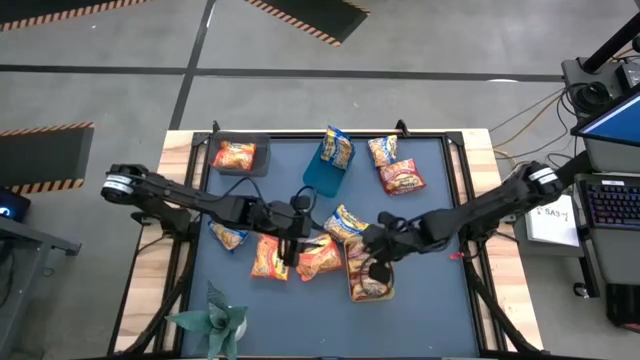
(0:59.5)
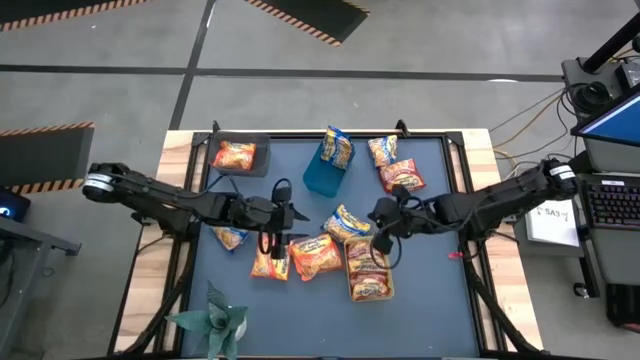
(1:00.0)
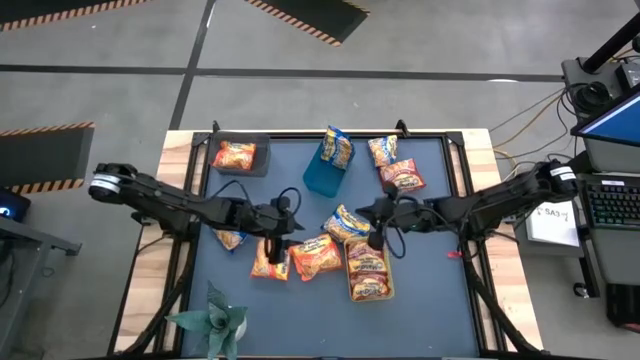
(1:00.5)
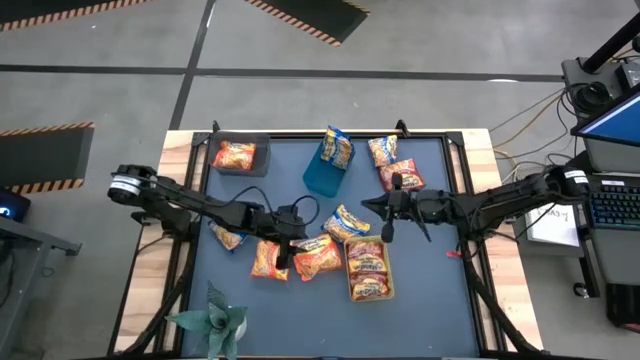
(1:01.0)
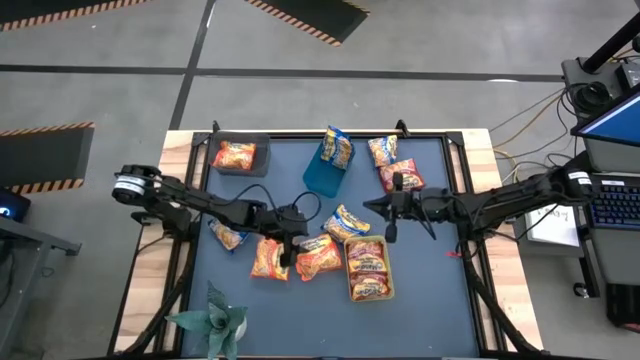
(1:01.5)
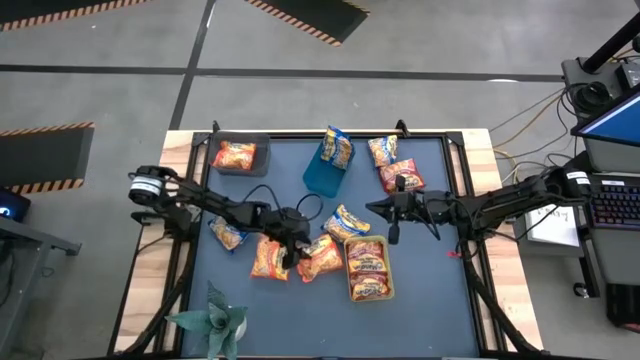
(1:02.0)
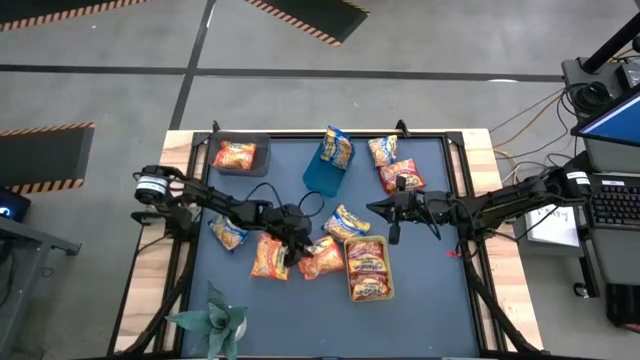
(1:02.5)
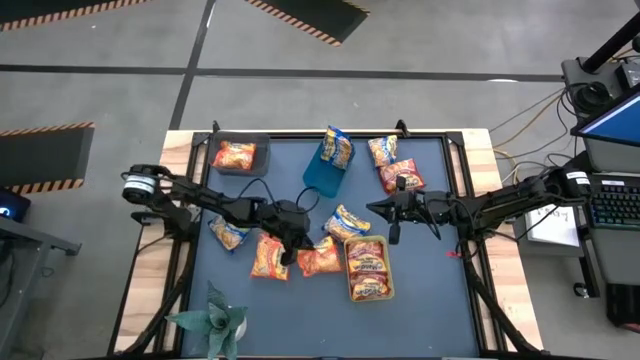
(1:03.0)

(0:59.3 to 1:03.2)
Task: Sort Maruchan noodles
Put the orange noodle pack into the black bin

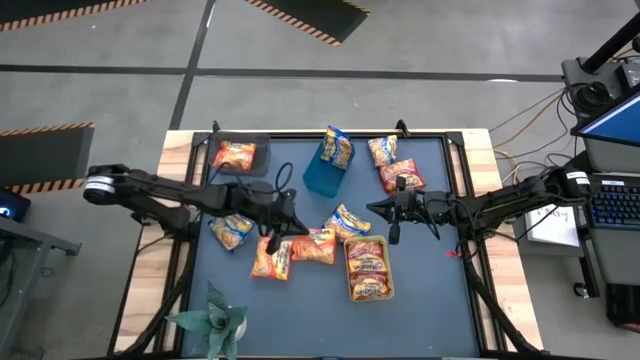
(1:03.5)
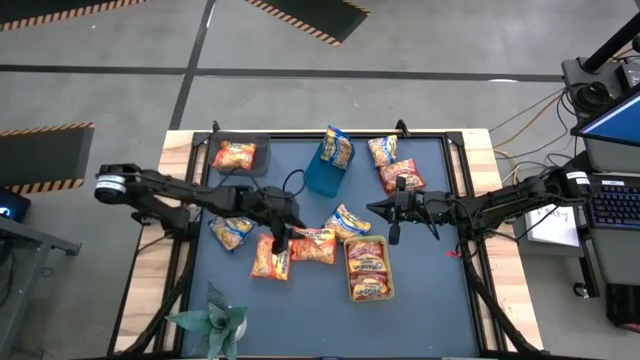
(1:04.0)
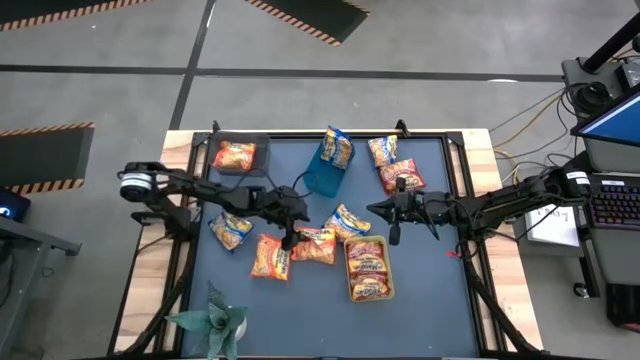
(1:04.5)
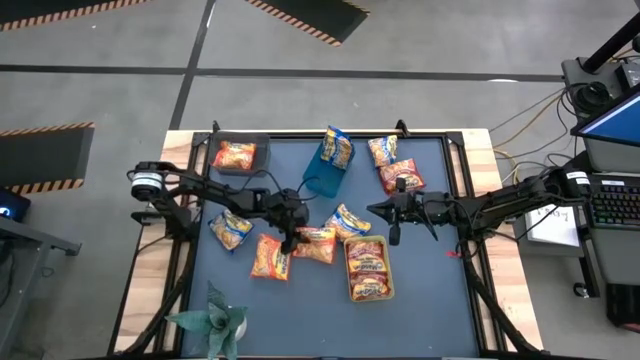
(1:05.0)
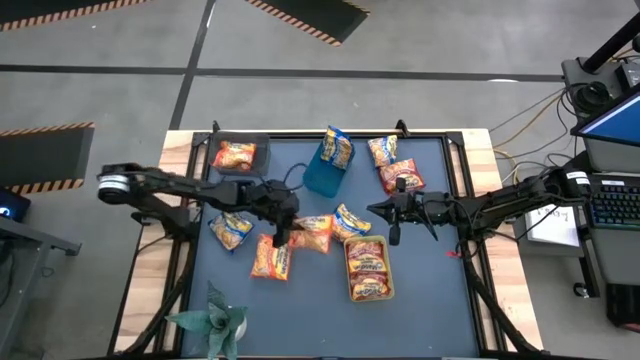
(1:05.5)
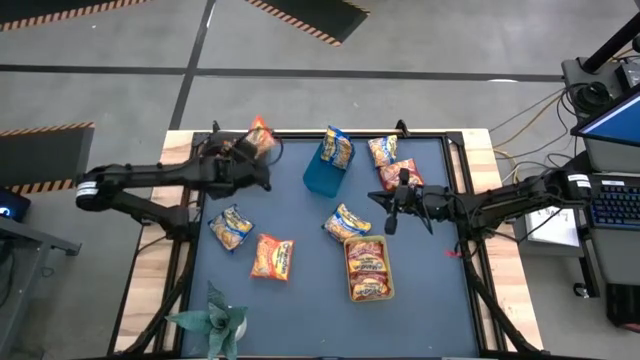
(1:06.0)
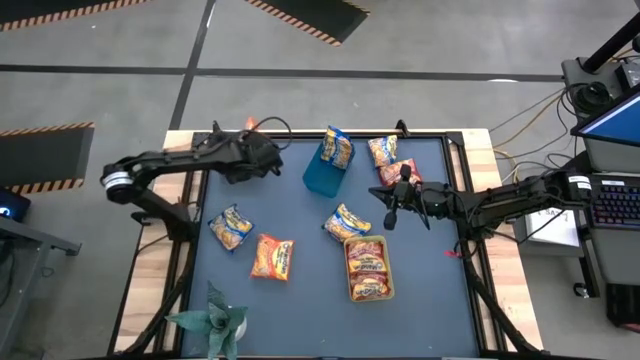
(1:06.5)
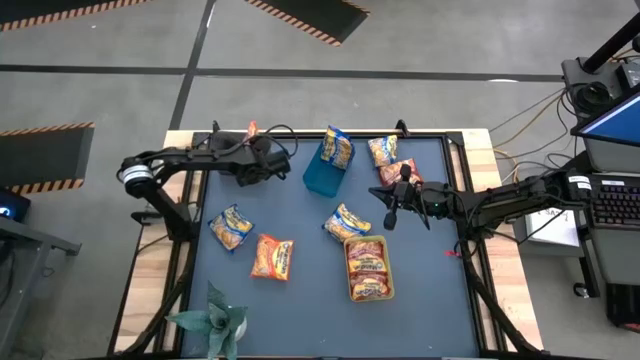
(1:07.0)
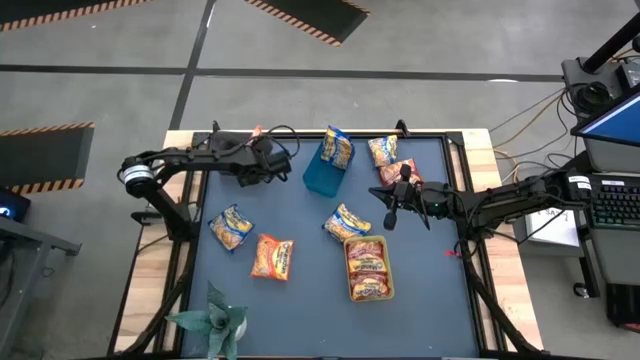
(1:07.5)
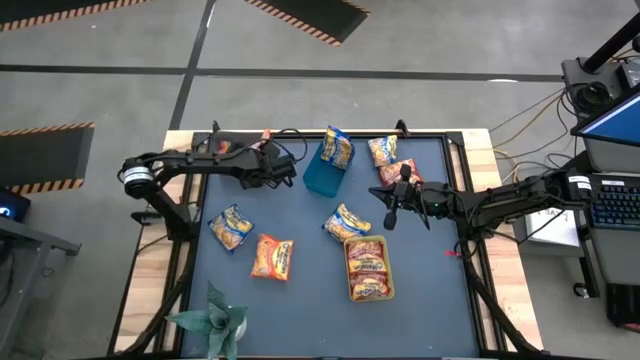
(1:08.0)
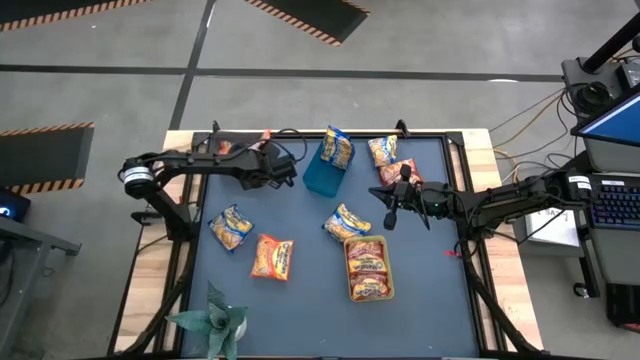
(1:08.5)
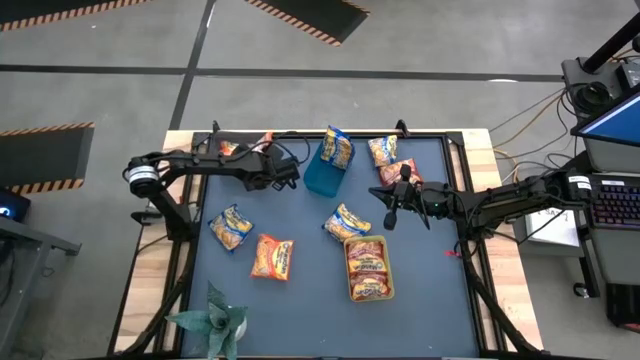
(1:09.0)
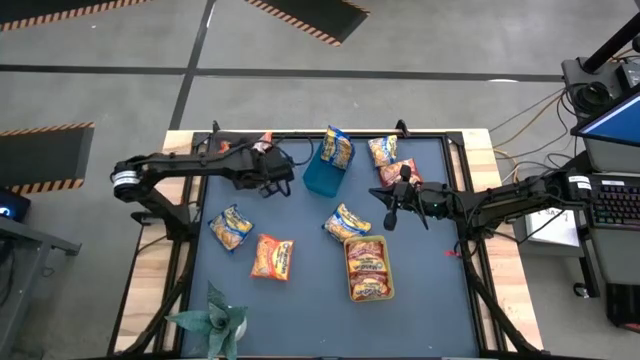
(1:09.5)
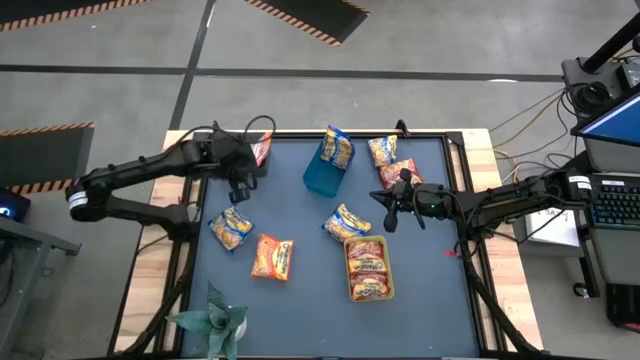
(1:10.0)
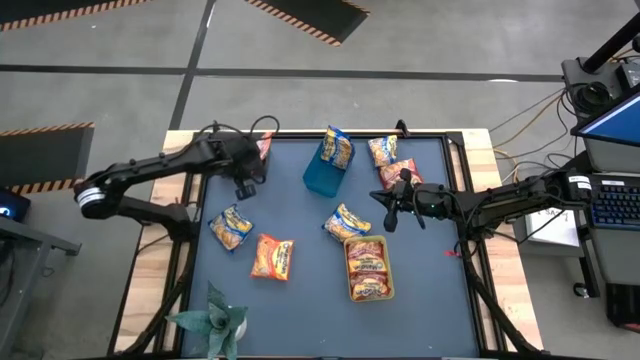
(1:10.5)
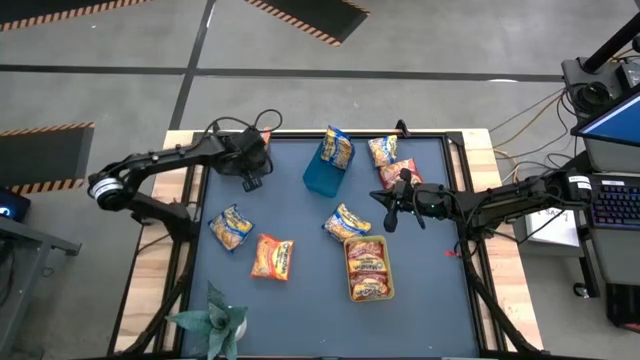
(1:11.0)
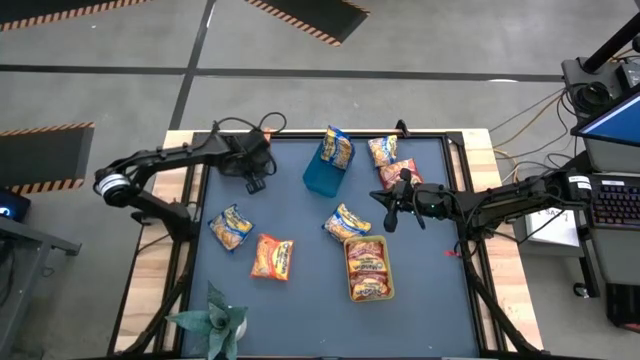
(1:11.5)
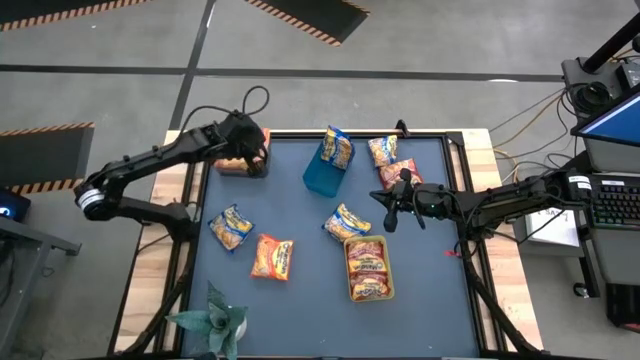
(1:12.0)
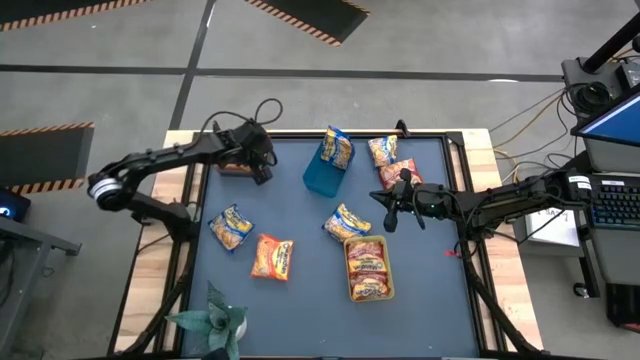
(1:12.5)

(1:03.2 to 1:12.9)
Put the orange noodle pack into the black bin

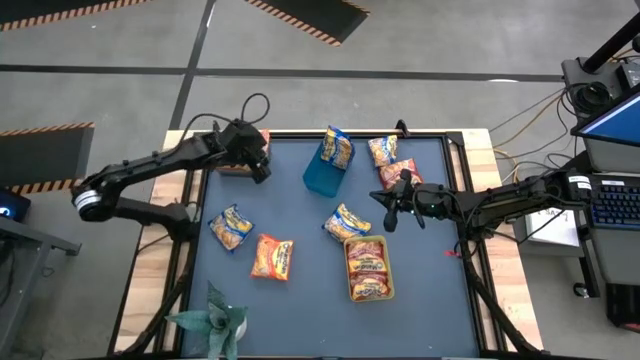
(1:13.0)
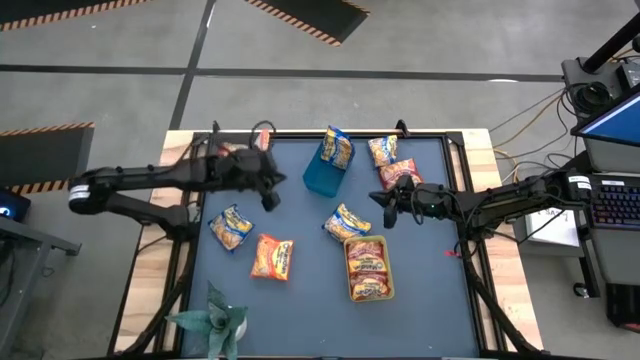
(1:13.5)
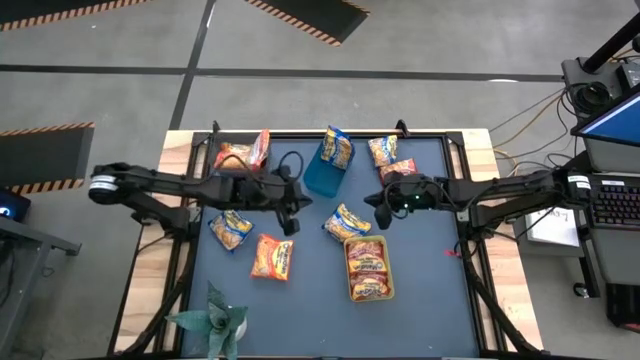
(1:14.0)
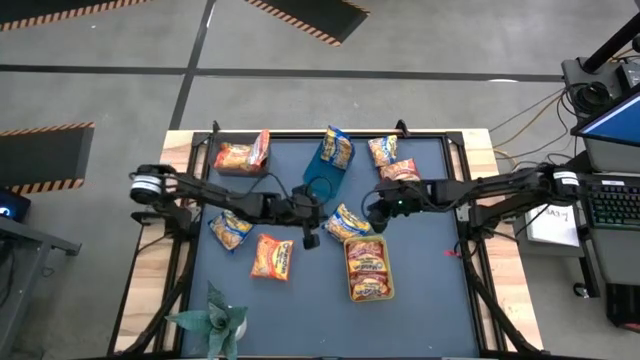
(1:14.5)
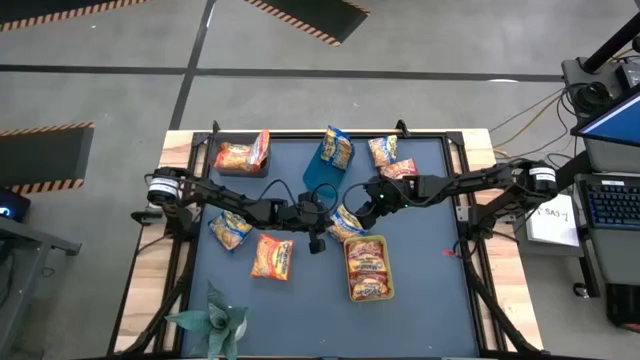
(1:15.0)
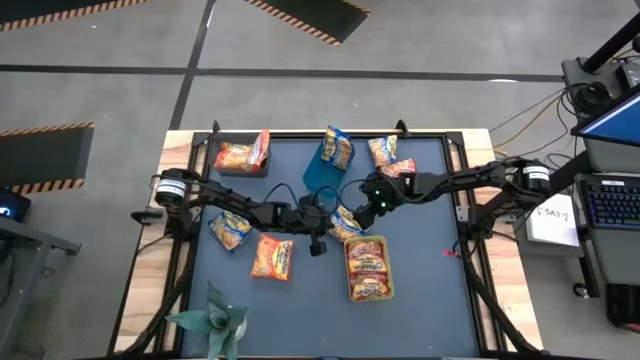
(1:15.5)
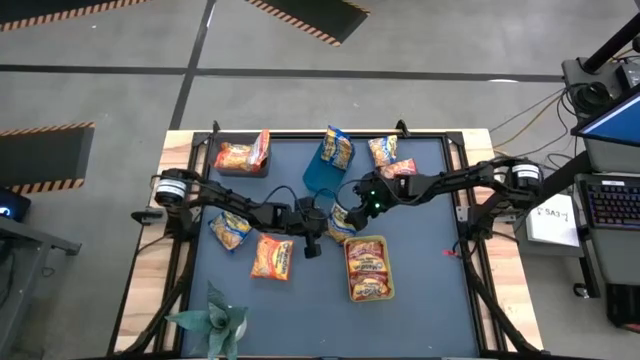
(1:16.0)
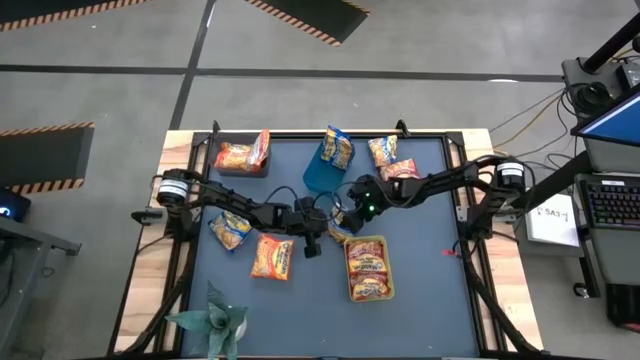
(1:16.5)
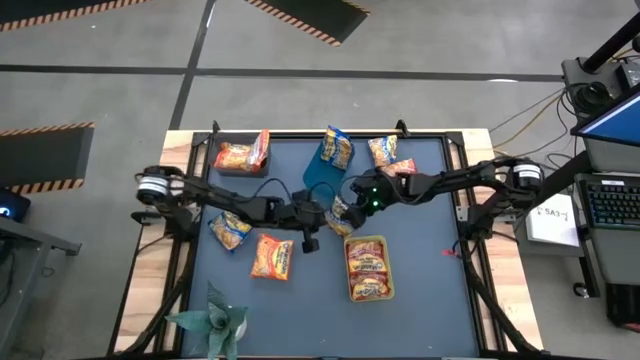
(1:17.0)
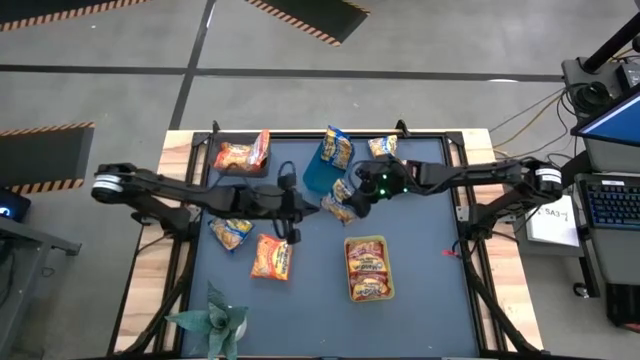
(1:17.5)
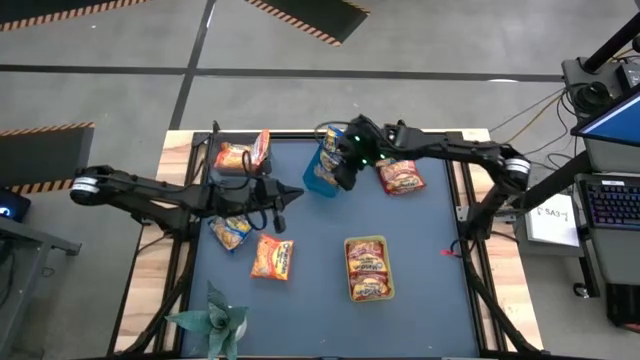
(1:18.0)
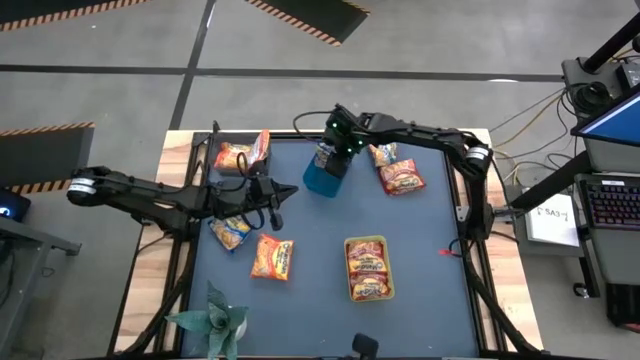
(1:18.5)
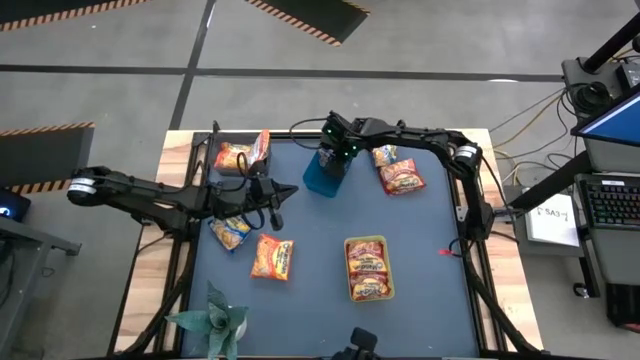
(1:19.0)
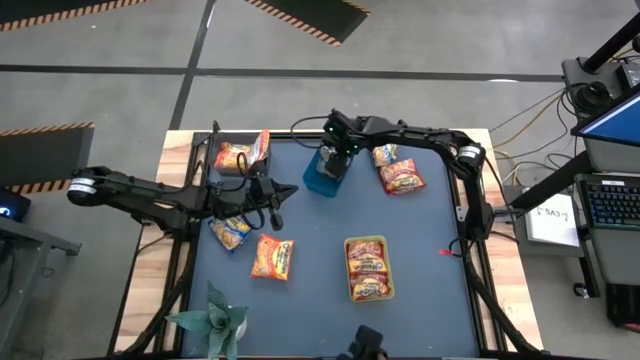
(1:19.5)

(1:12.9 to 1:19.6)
Put the blue noodle pack into the blue bin

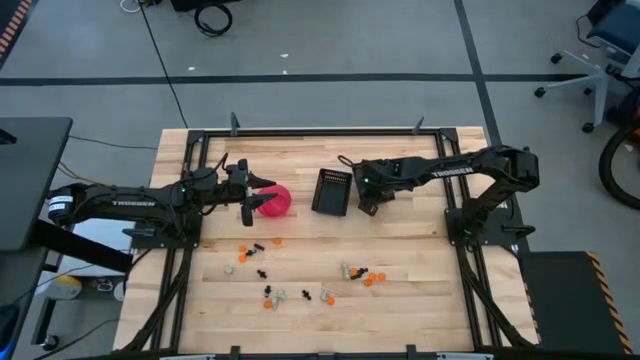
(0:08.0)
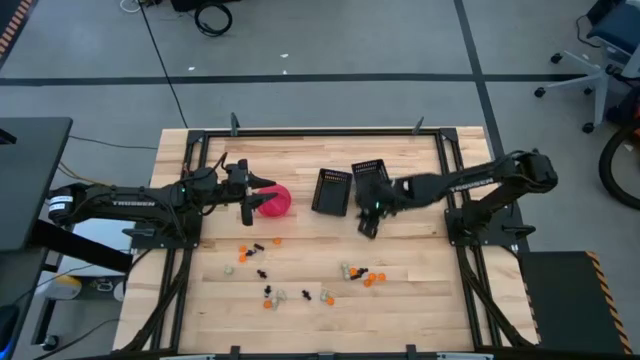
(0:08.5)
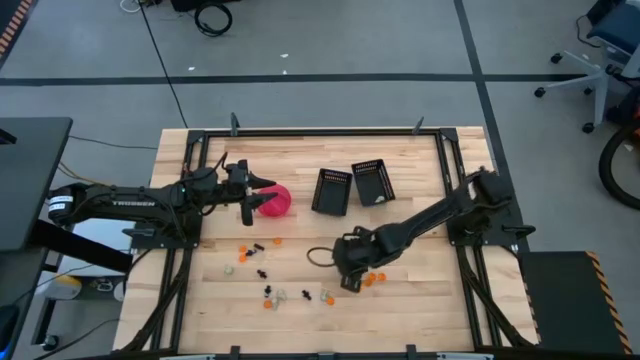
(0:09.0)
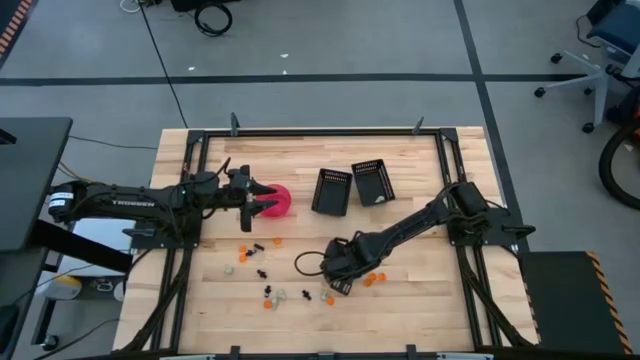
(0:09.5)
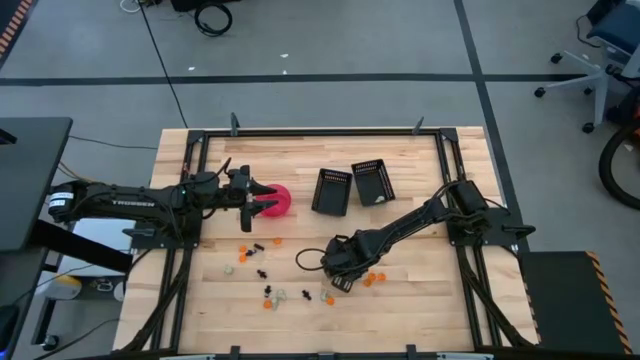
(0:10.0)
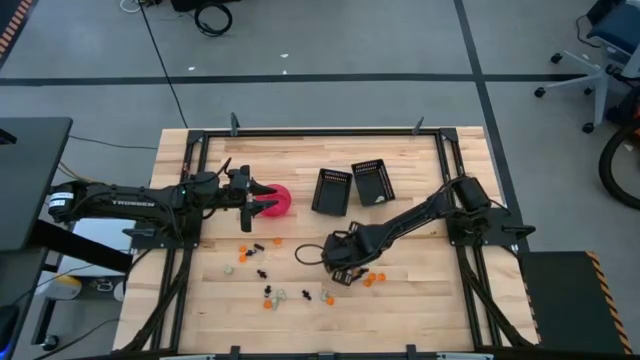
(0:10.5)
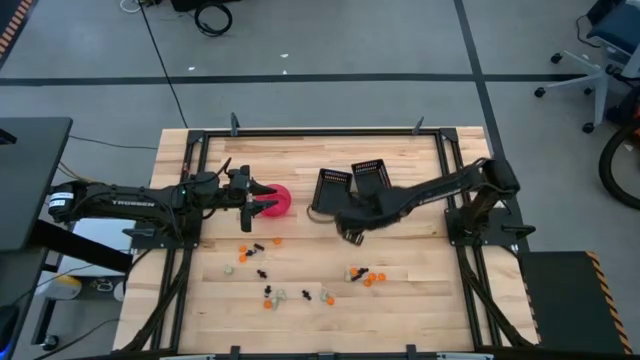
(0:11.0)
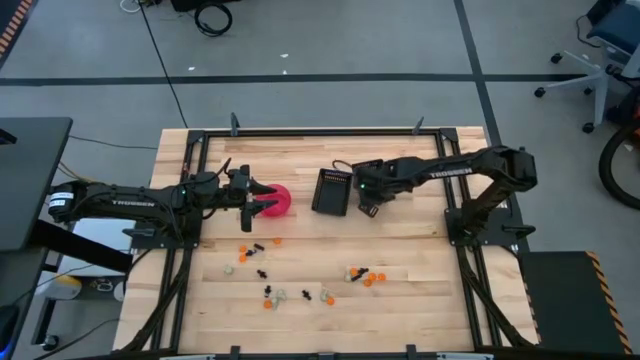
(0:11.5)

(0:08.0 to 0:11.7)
Task: Sort Halloween decoration
Put the white skull toy into the right black bin
